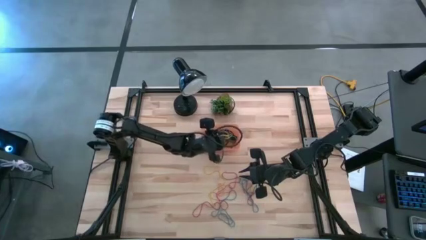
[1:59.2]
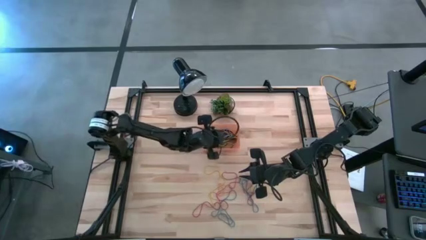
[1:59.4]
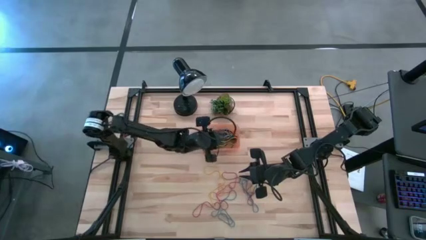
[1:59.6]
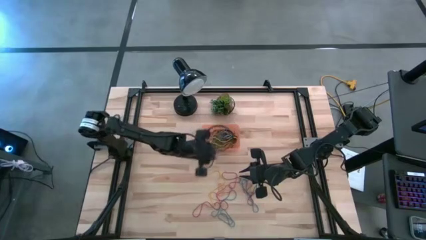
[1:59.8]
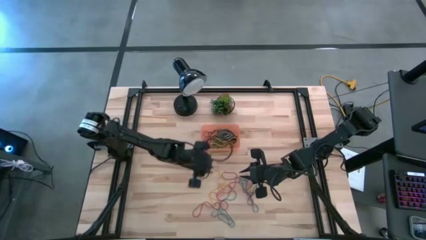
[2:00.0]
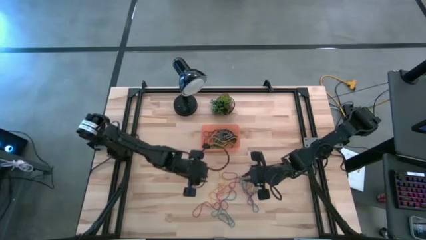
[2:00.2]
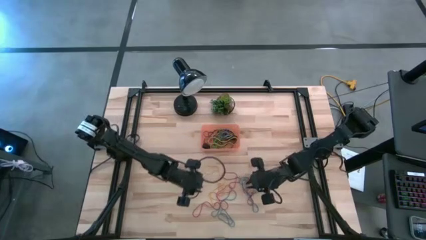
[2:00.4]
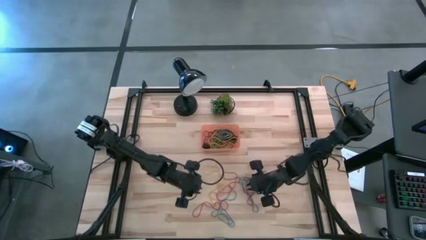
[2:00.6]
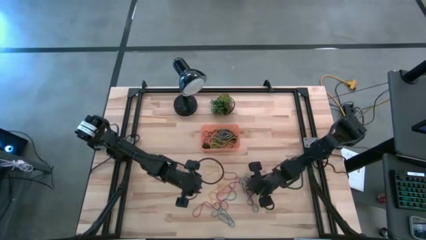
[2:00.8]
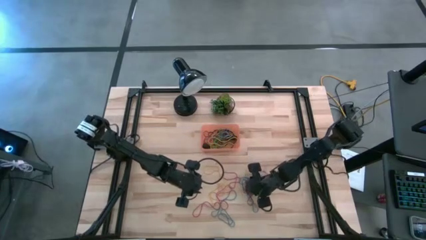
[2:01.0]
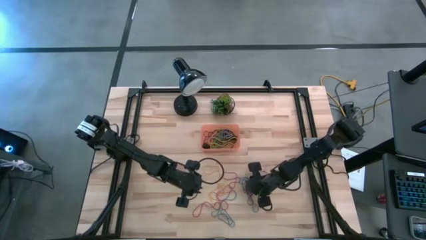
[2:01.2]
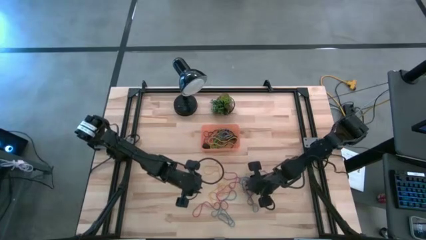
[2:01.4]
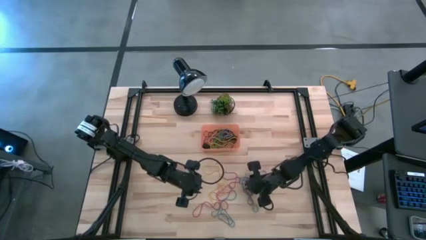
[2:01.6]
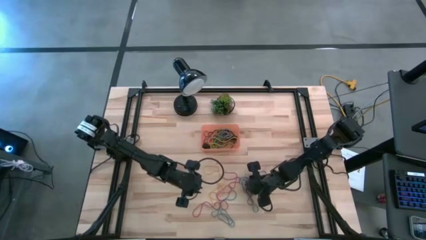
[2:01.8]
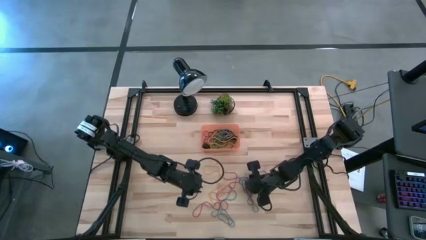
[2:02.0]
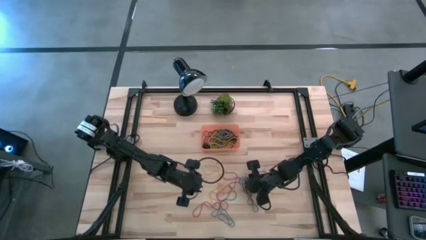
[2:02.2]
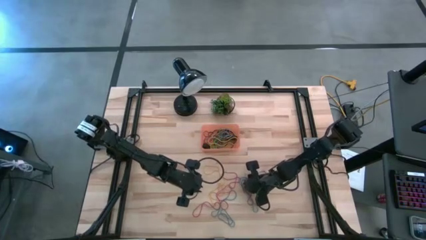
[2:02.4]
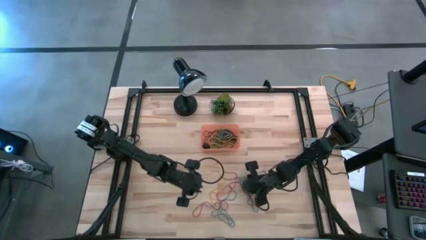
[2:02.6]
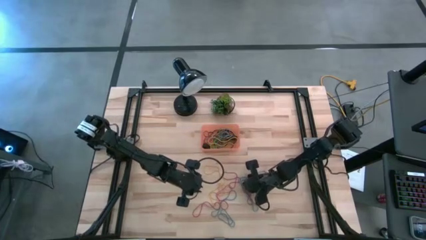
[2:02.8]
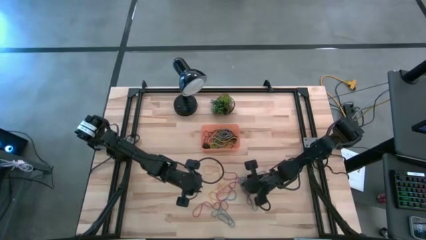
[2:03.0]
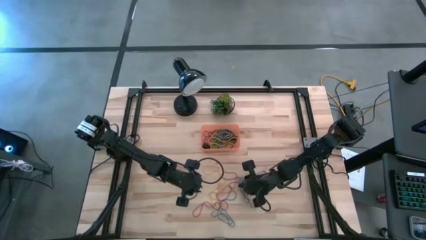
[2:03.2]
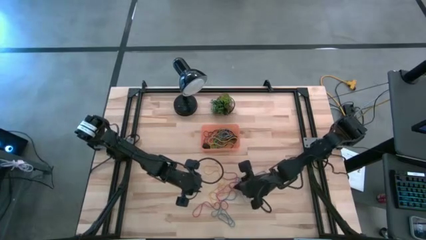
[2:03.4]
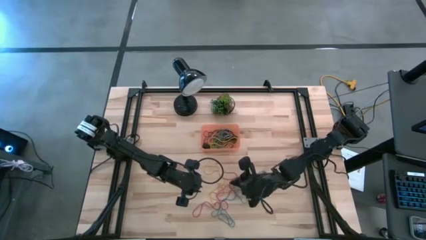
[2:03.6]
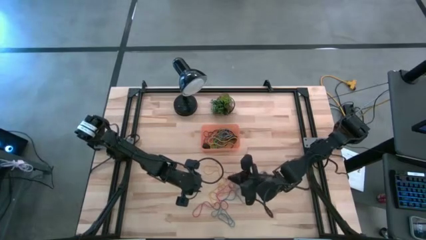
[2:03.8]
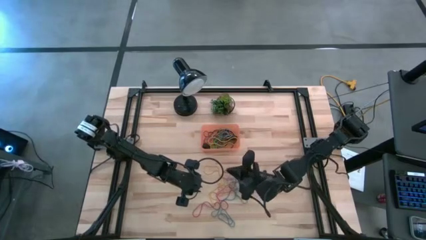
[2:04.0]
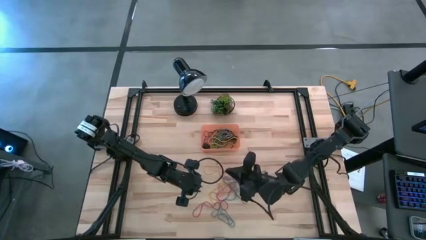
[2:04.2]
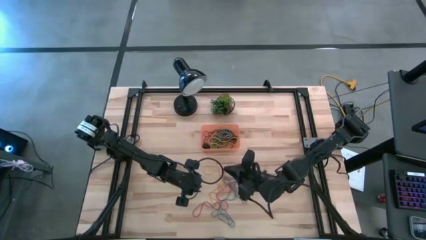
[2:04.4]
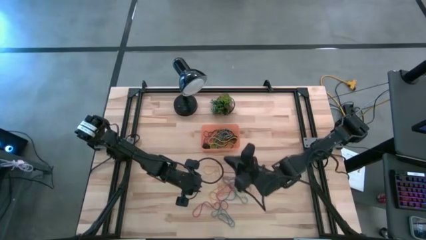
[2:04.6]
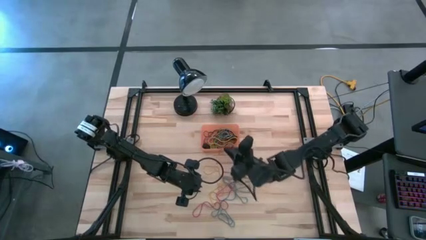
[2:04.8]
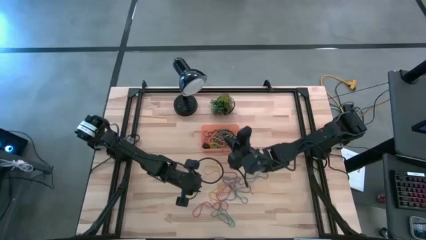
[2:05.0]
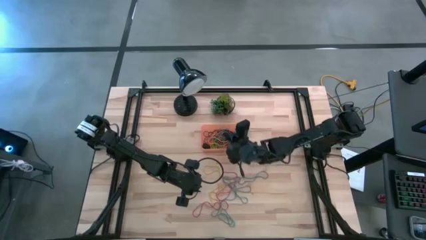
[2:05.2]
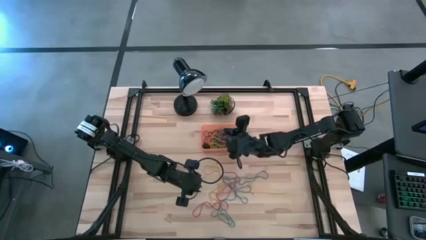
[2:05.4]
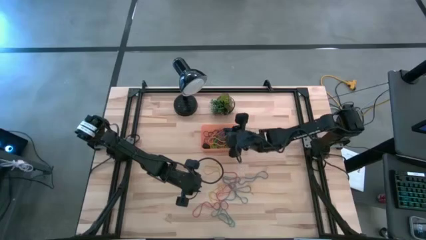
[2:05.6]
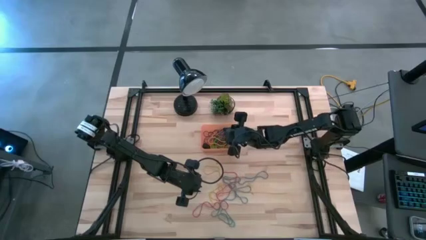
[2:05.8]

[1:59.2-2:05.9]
Task: Pick and place rubber bands into bin
Put the red rubber band into the orange bin

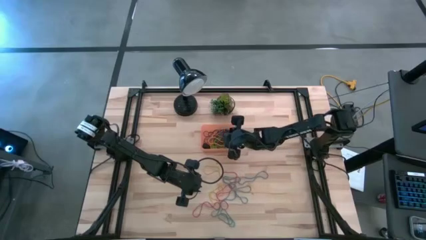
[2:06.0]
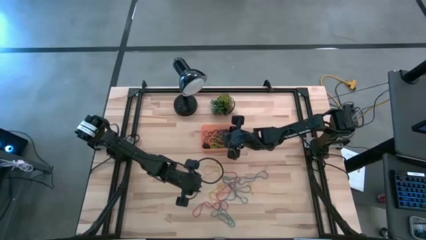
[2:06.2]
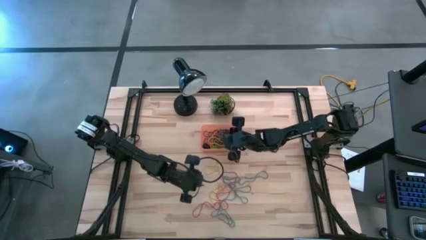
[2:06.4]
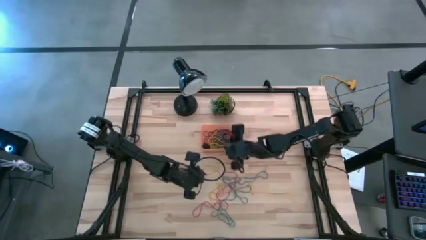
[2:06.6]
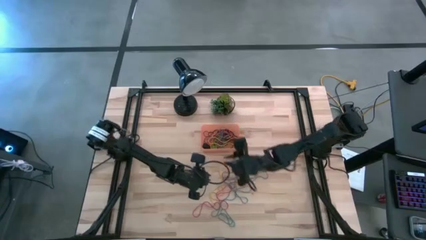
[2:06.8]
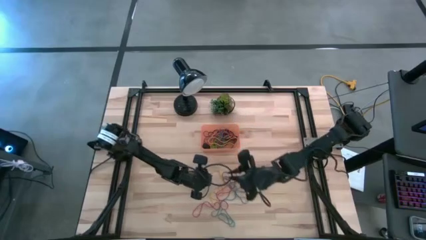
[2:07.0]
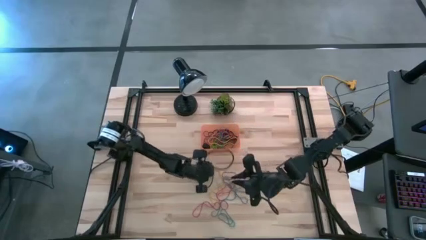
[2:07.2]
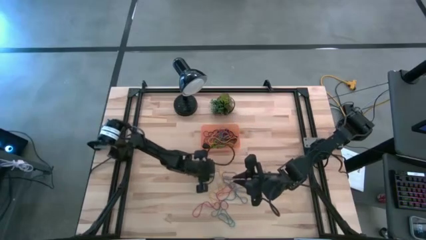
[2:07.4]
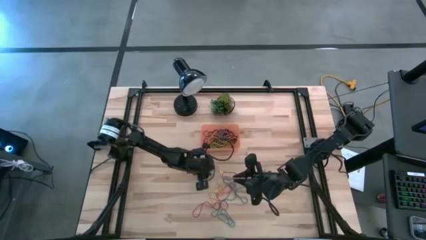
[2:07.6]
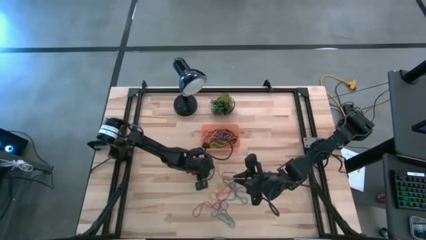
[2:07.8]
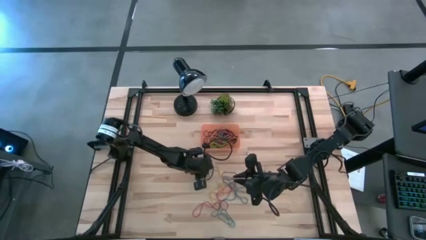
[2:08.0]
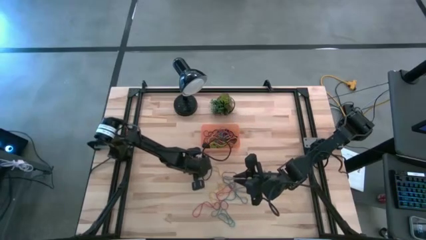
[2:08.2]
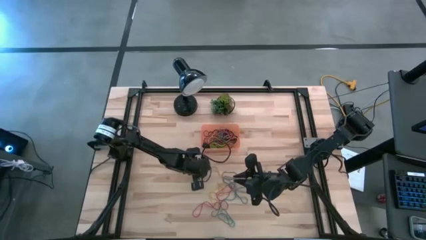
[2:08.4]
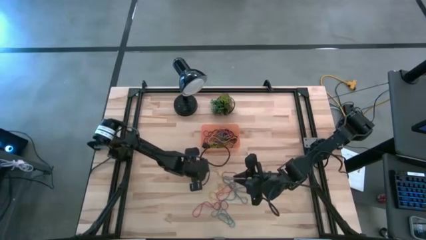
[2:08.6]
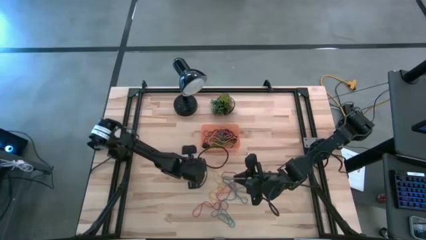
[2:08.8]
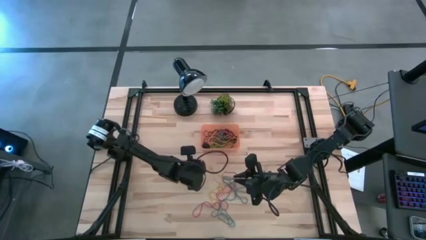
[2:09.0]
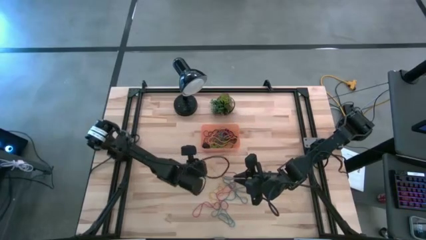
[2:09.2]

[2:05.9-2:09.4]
Put the yellow rubber band into the orange bin

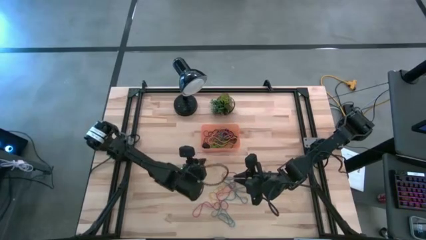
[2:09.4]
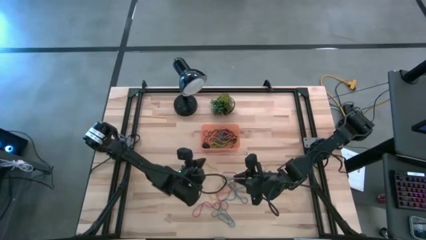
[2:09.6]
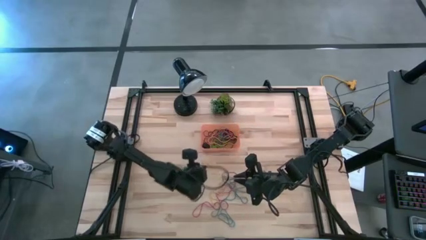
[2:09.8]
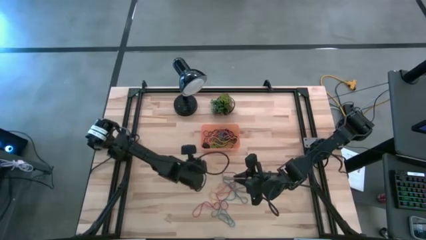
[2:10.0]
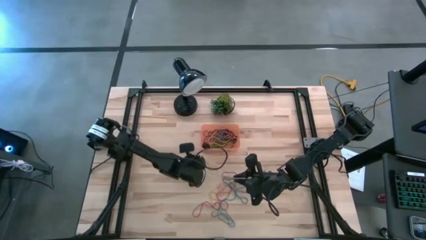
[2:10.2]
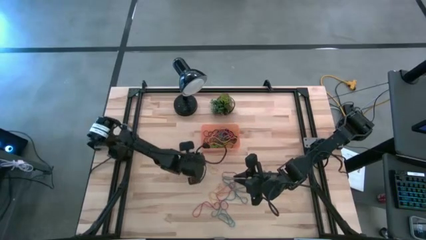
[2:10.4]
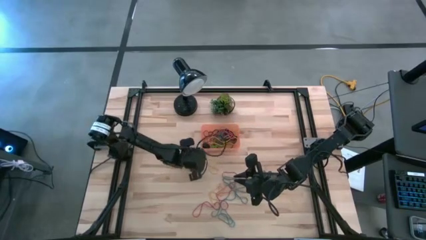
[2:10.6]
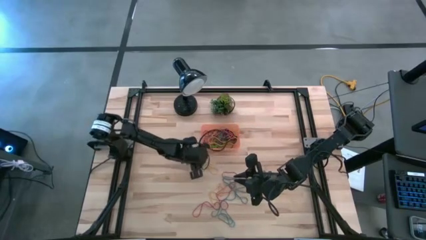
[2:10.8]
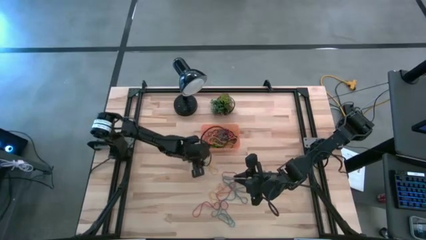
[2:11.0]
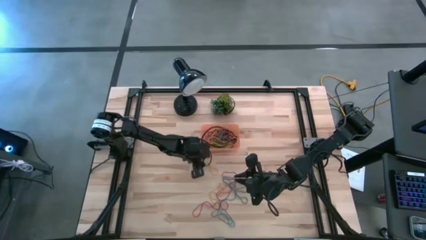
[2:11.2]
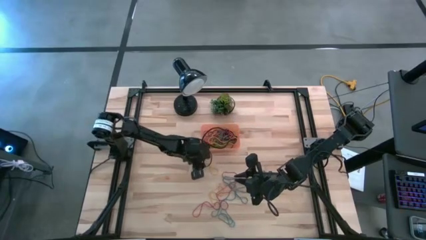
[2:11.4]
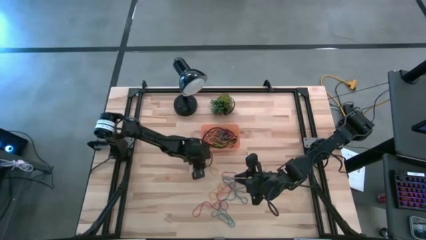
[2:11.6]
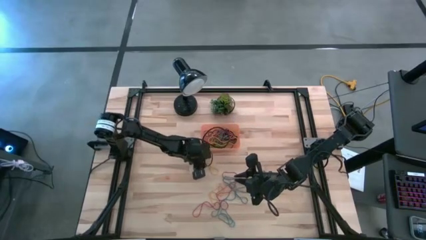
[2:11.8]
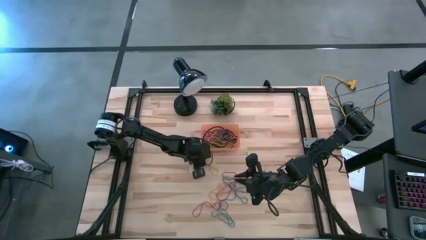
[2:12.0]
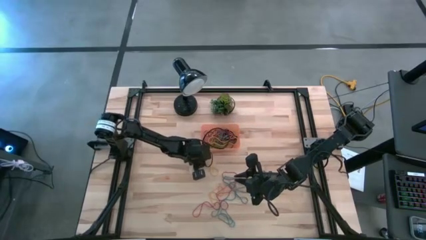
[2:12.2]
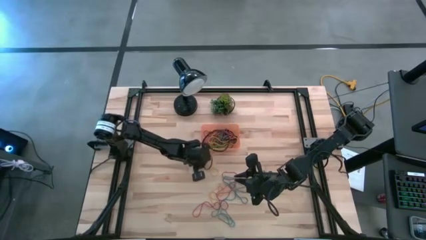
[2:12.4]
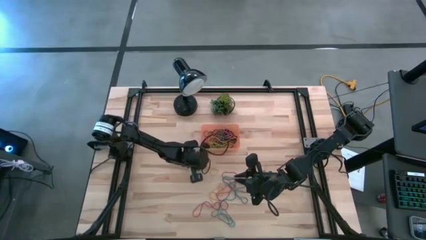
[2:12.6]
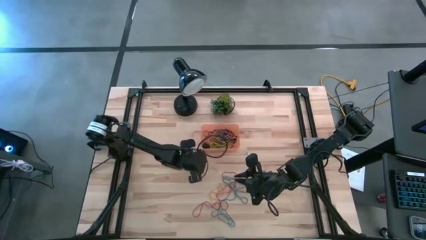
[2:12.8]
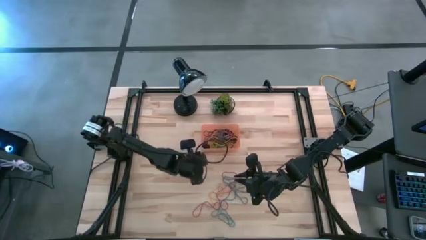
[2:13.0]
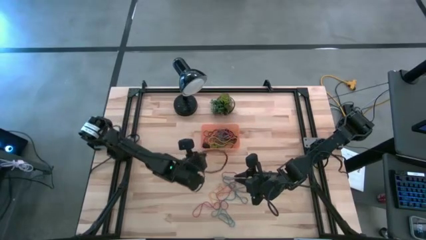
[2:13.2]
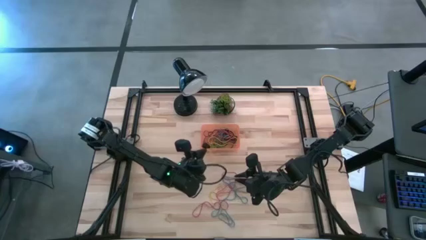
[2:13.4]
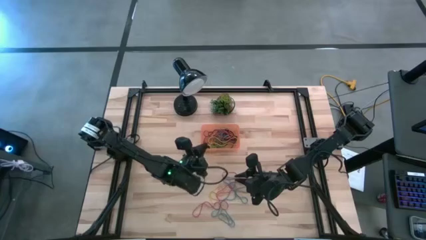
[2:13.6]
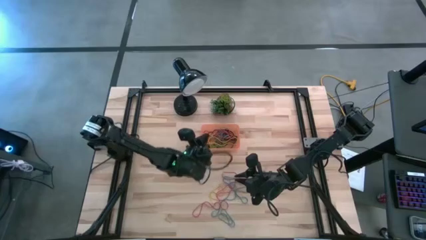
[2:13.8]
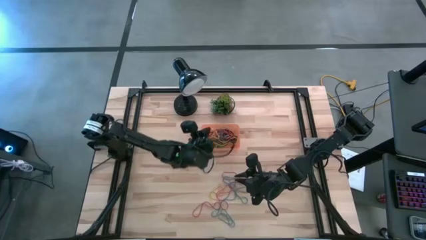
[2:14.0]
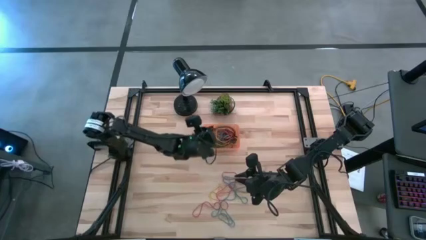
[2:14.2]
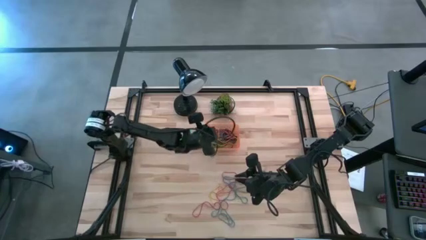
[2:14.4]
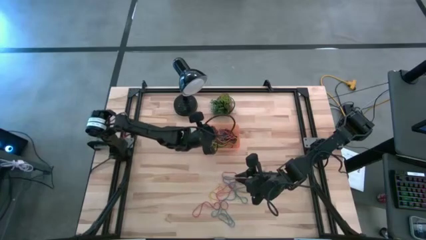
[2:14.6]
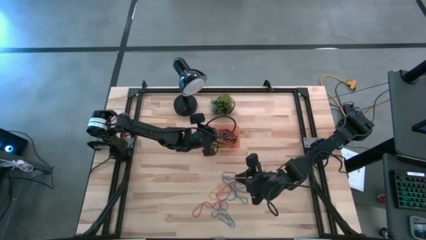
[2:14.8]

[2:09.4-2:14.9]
Put the yellow rubber band into the orange bin

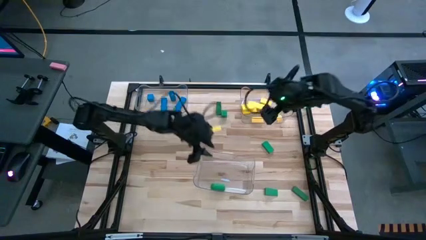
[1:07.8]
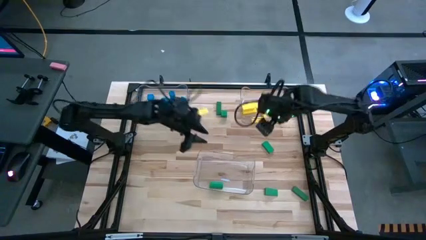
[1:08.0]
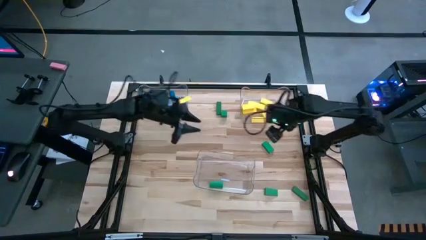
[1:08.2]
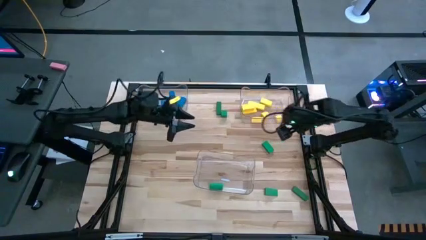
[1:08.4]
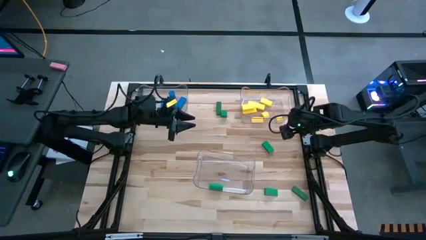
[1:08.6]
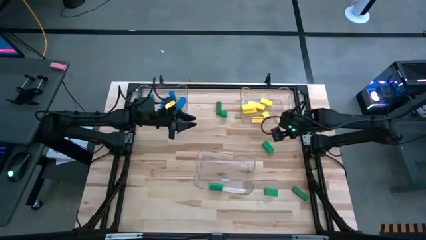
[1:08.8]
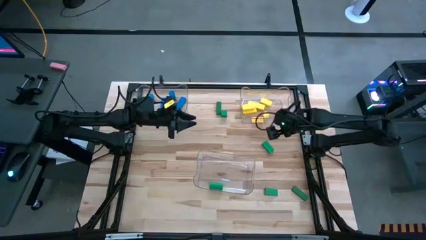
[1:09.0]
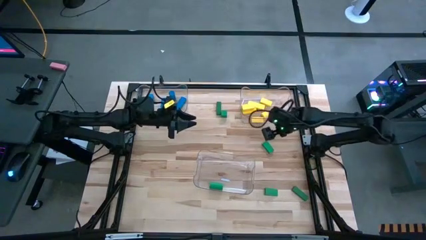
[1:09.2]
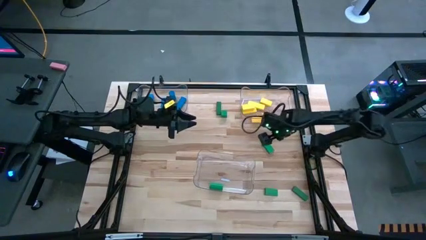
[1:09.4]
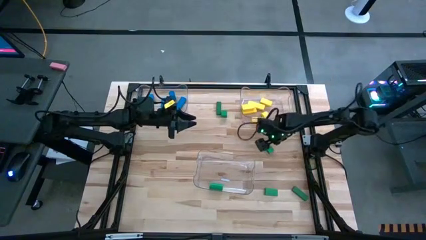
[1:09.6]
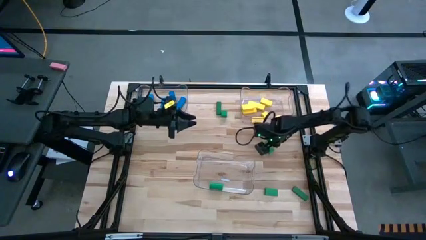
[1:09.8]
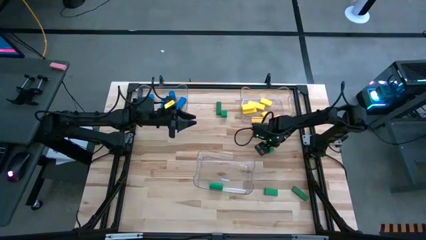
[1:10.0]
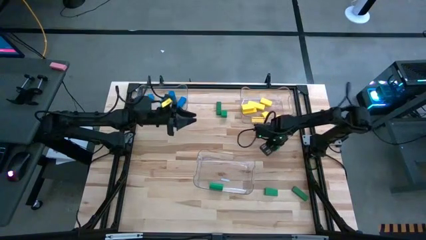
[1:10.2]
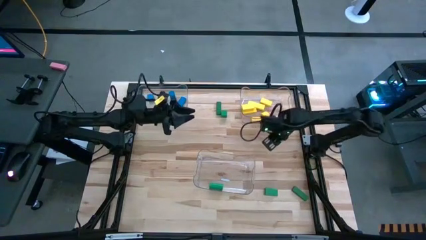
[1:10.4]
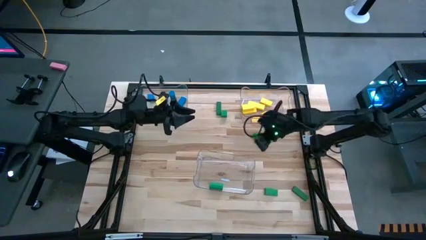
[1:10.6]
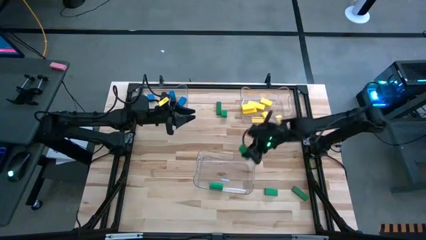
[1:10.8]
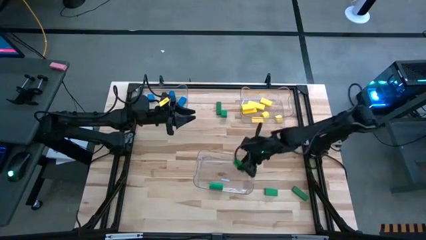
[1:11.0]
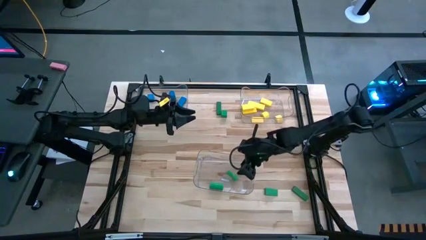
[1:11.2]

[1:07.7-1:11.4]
Task: Sort blocks
Put the green block into the bottom transparent bin
